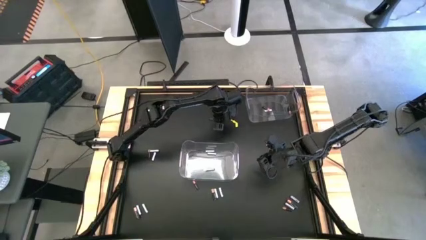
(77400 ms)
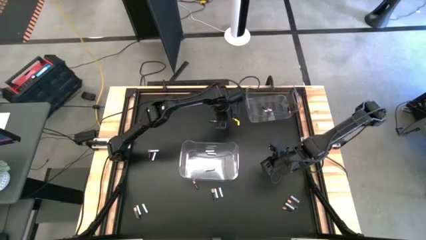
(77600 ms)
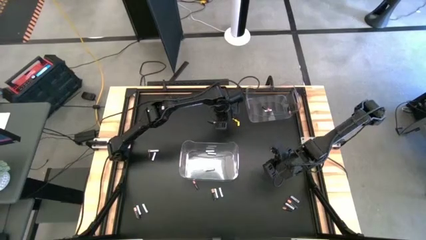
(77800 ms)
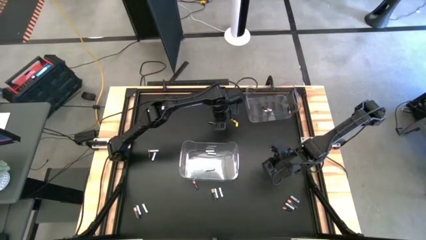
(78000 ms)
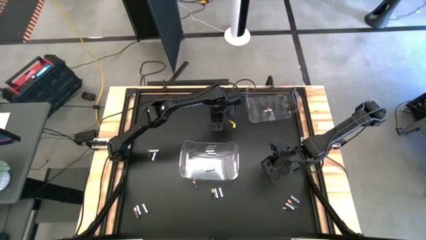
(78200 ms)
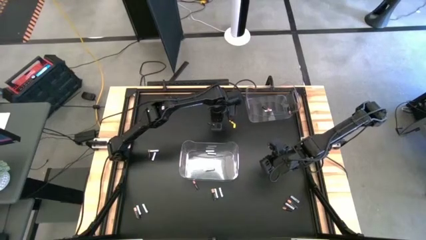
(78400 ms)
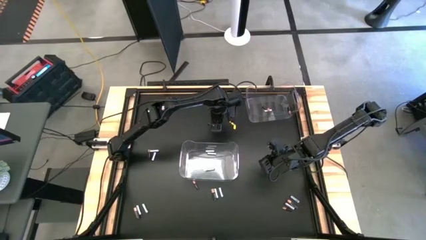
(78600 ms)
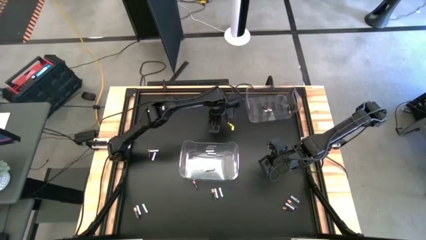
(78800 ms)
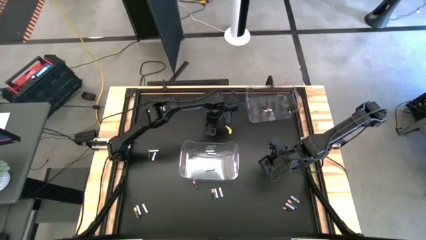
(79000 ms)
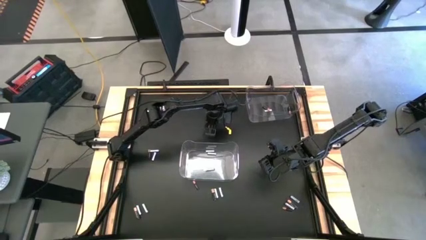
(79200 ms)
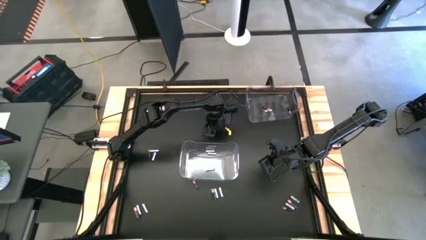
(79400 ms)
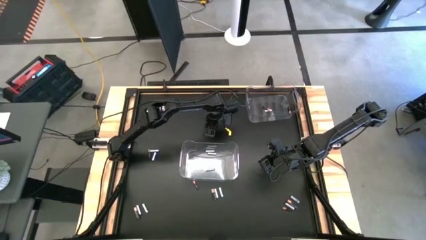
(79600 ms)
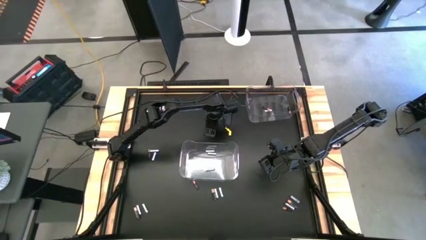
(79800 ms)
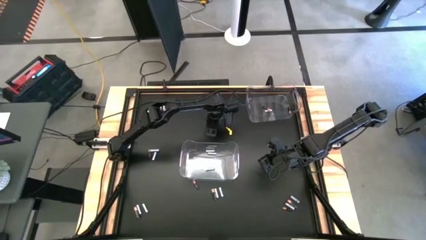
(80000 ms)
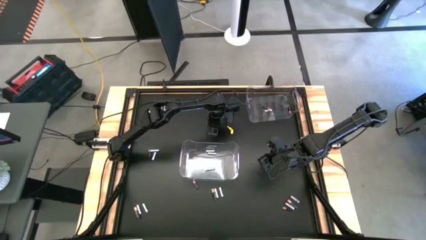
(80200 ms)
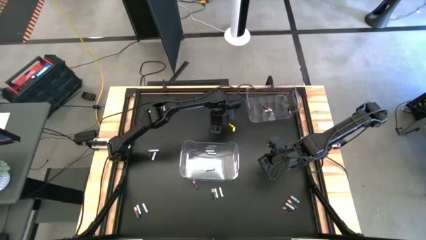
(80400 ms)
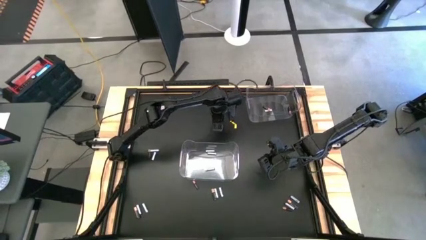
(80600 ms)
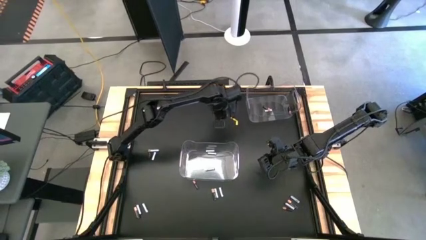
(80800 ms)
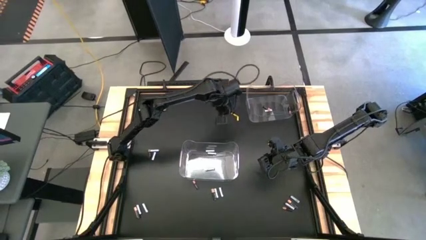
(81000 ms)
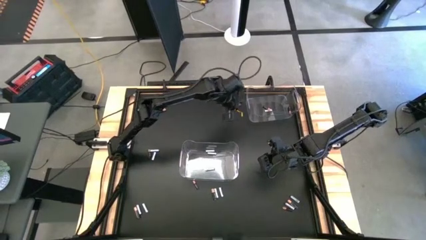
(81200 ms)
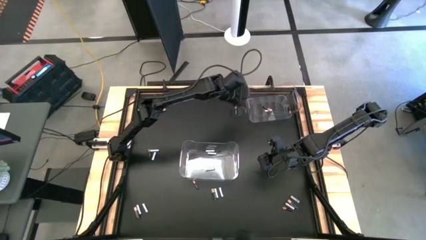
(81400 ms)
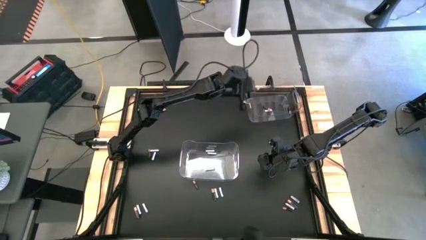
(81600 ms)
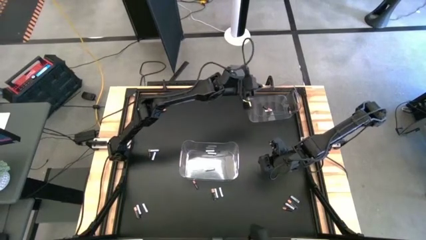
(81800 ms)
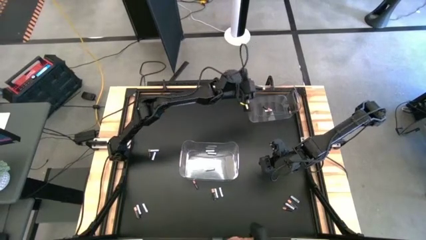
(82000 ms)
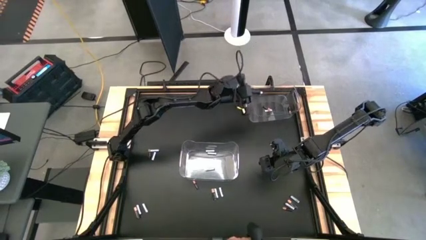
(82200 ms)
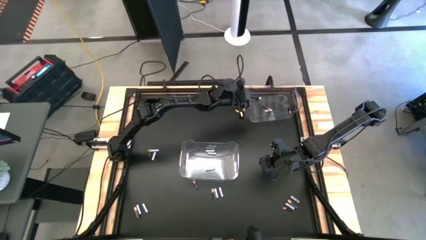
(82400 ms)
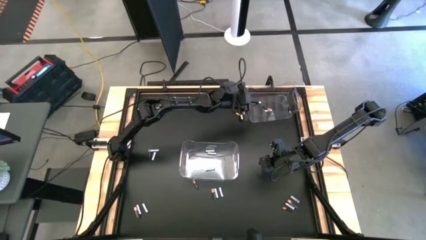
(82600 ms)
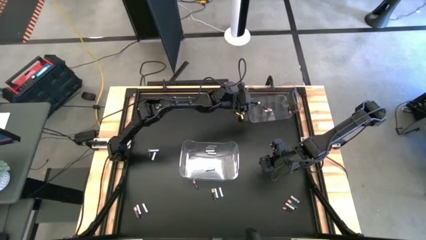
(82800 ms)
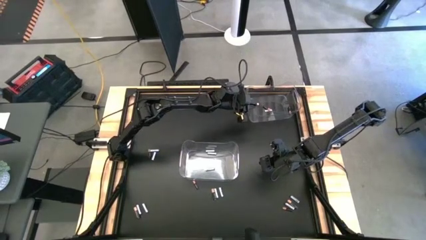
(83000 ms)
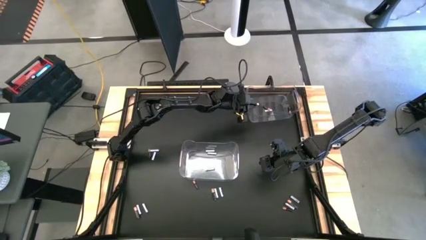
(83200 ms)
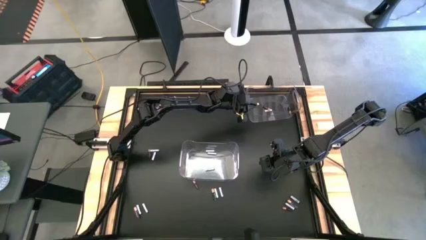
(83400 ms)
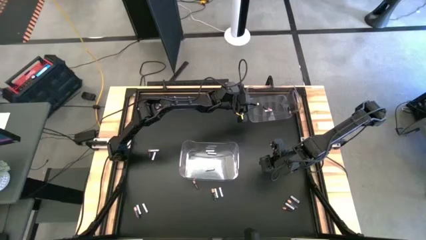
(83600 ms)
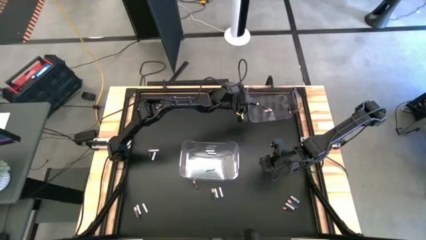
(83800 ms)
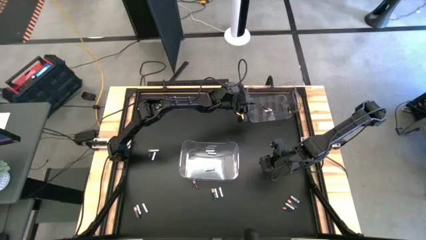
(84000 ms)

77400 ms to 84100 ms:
Task: Sort batteries
Put the black battery into the top transparent bin

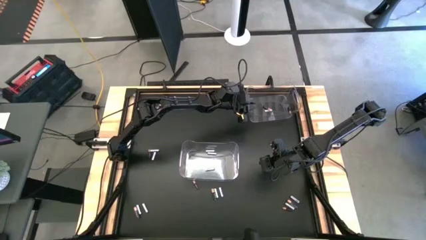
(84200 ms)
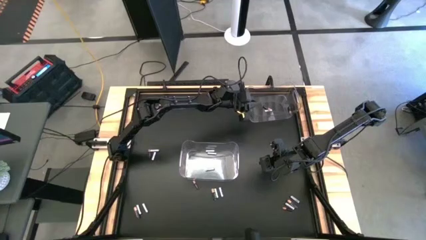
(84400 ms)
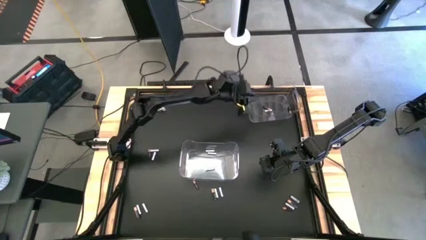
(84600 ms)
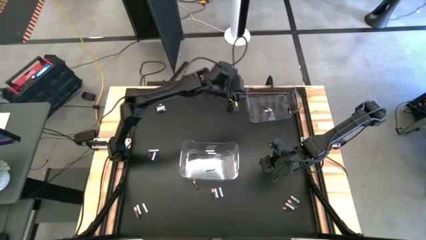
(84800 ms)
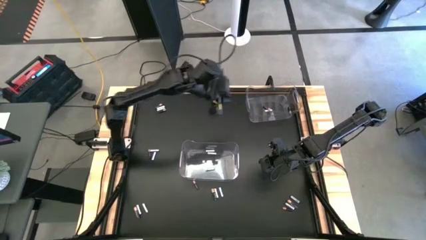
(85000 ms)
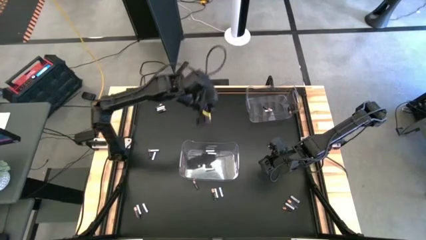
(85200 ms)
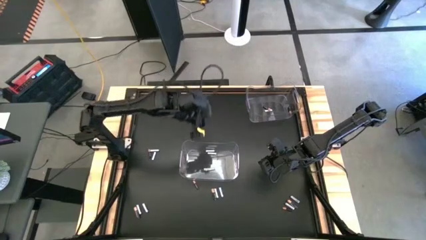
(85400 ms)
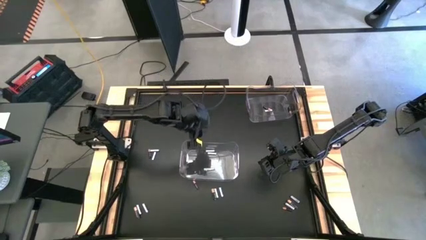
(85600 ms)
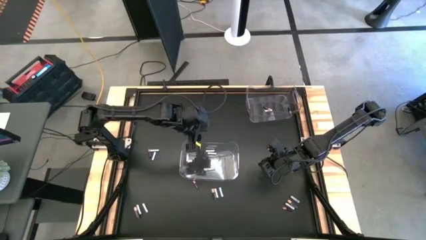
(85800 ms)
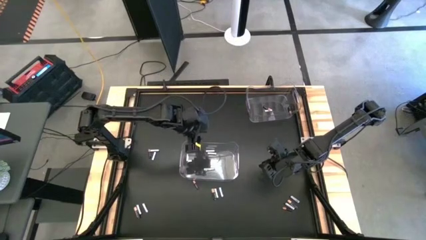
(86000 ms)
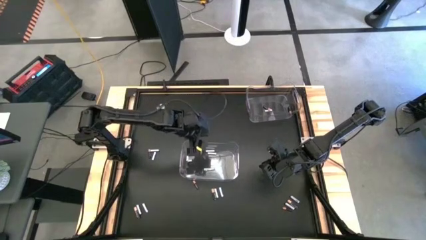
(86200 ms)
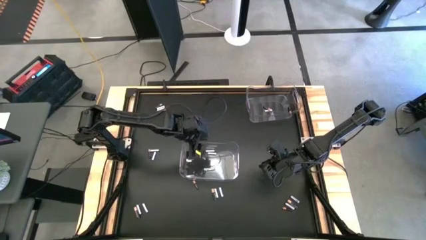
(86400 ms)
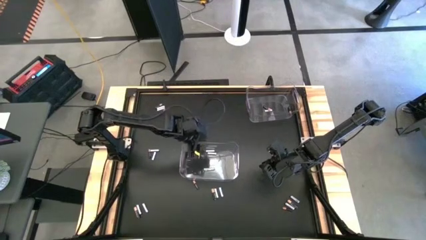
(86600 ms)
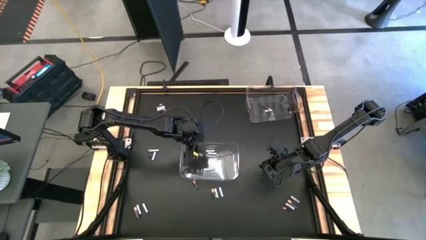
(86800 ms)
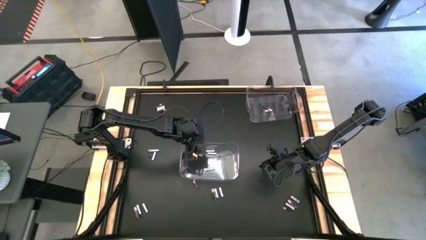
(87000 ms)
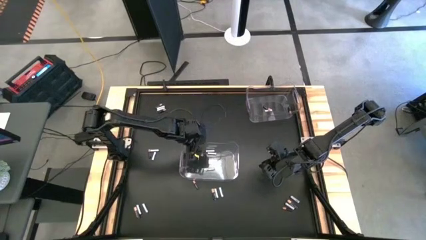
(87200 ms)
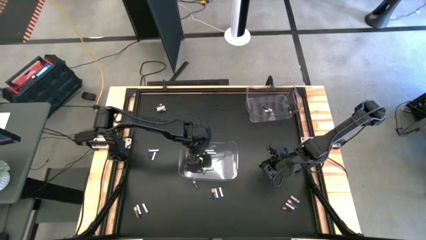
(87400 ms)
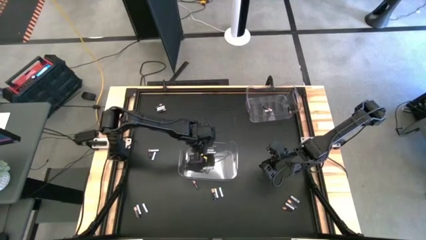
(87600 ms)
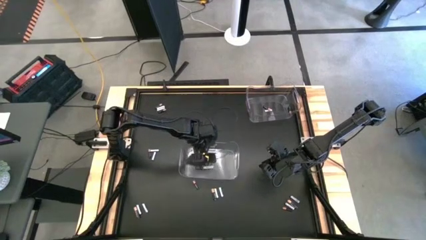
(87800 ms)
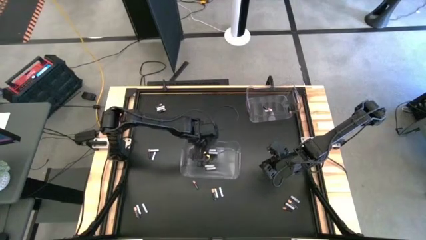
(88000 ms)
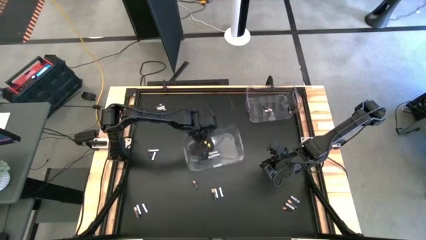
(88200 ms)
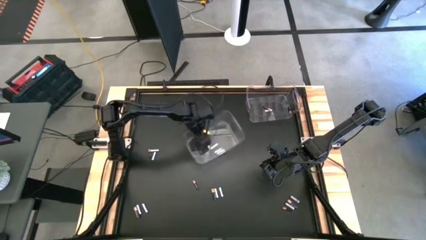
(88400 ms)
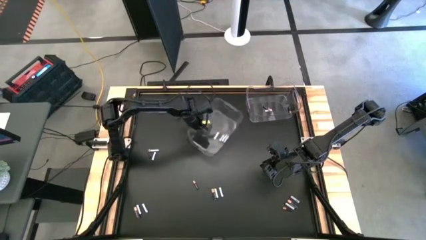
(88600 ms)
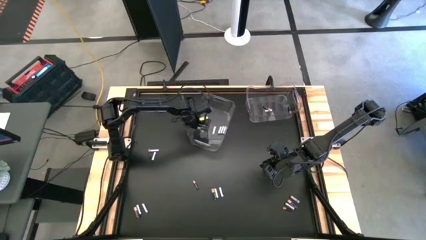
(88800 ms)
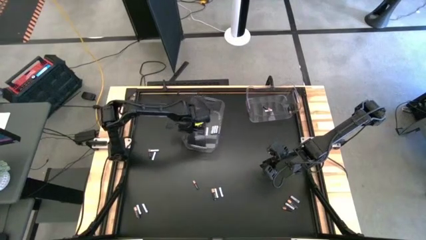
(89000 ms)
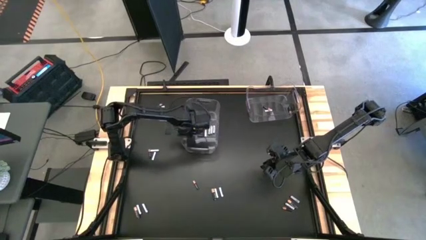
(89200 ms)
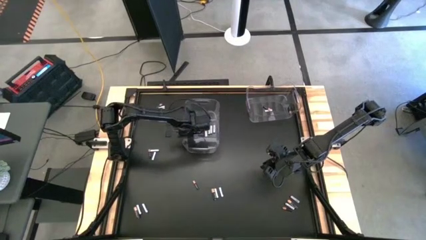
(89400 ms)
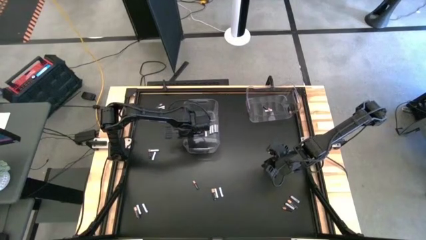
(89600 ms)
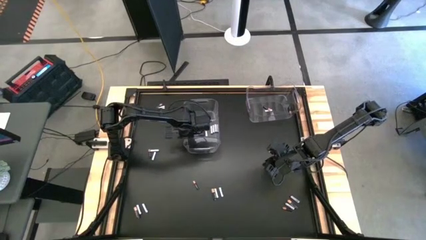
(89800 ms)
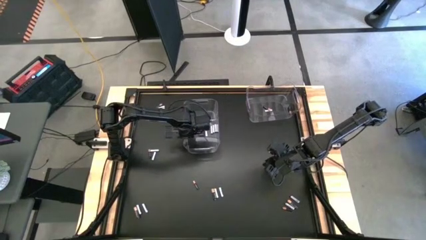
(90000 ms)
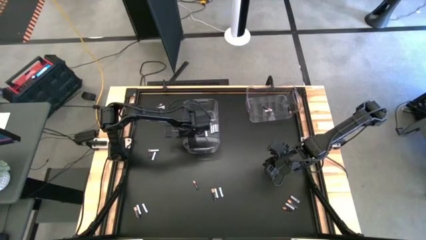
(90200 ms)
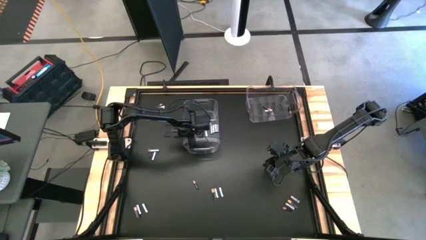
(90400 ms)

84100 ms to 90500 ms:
Move the bottom transparent bin to the top center of the table

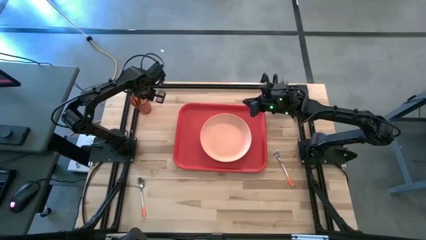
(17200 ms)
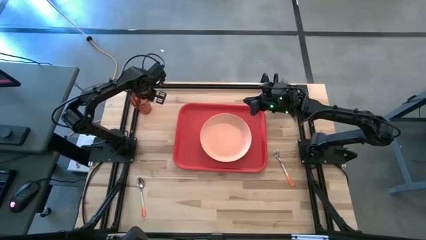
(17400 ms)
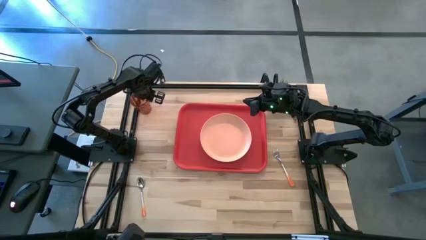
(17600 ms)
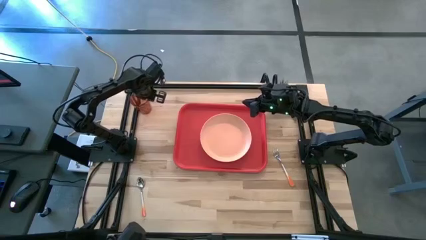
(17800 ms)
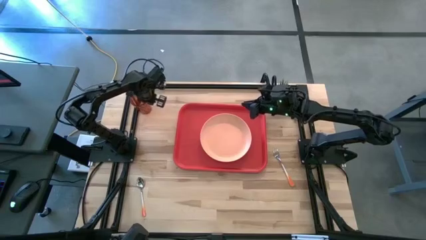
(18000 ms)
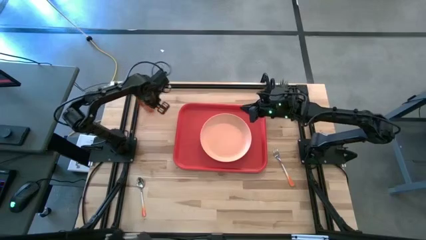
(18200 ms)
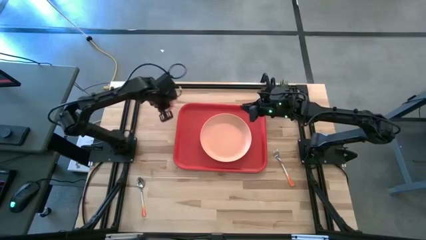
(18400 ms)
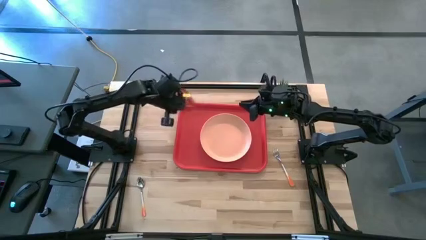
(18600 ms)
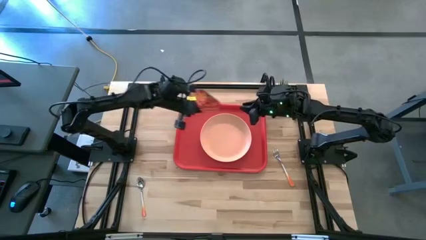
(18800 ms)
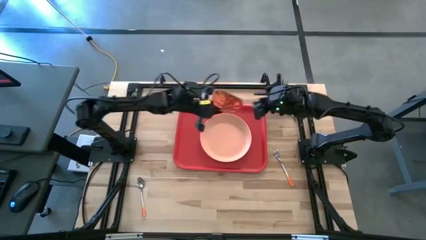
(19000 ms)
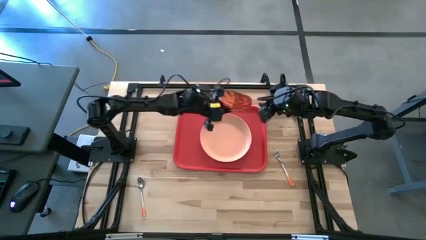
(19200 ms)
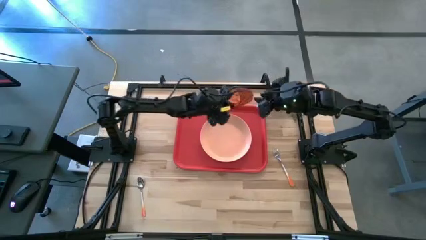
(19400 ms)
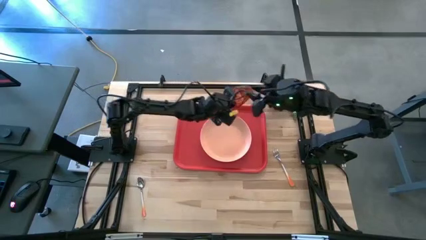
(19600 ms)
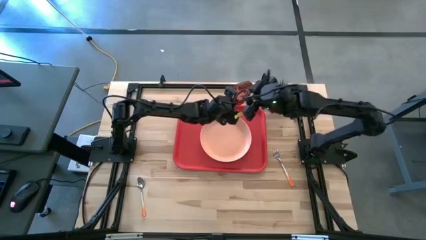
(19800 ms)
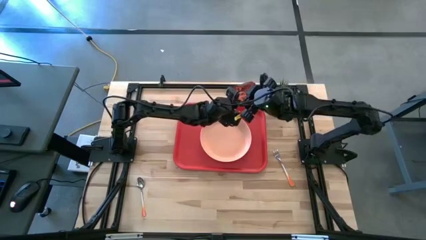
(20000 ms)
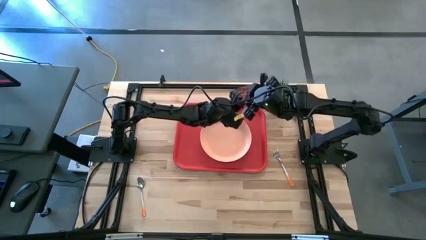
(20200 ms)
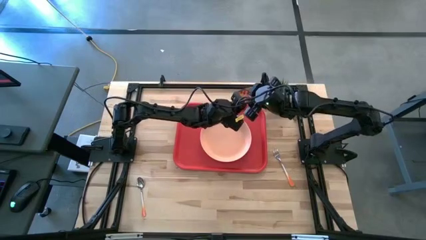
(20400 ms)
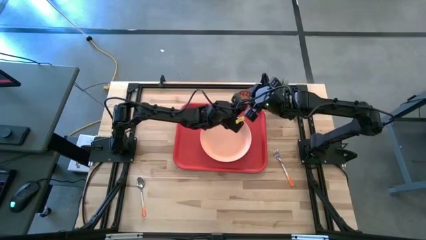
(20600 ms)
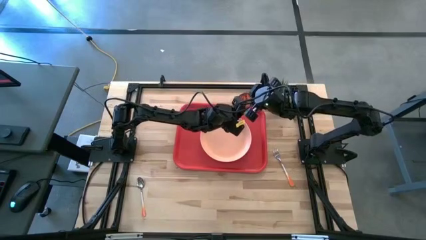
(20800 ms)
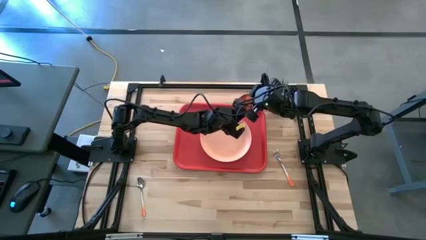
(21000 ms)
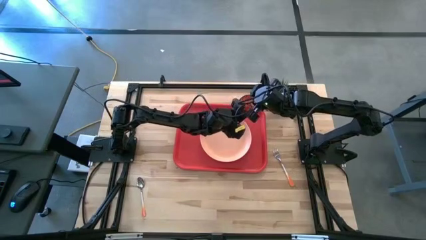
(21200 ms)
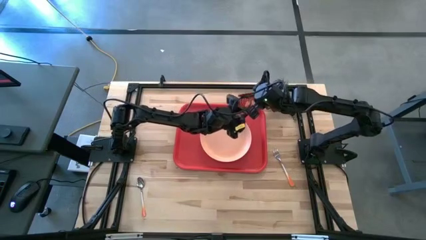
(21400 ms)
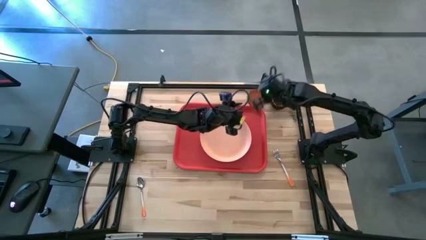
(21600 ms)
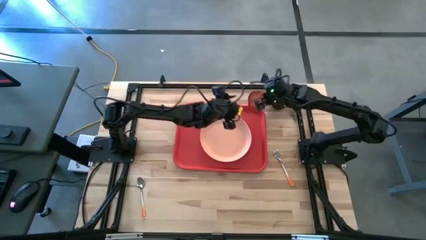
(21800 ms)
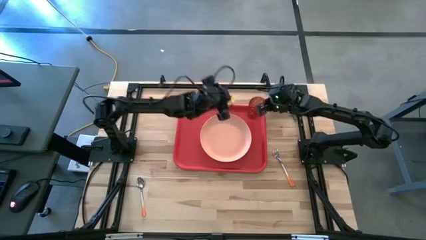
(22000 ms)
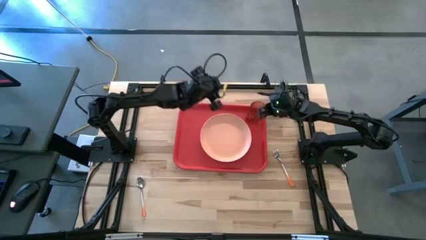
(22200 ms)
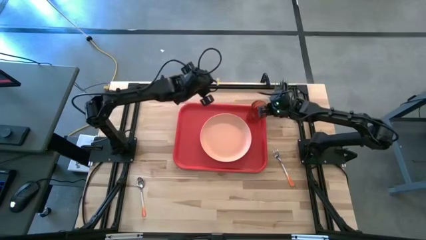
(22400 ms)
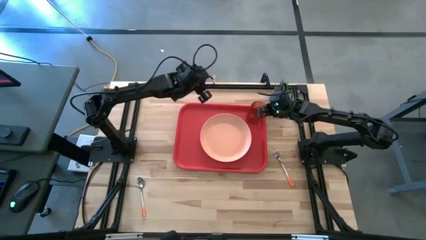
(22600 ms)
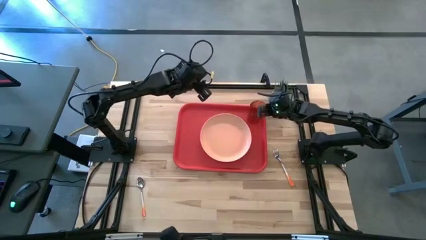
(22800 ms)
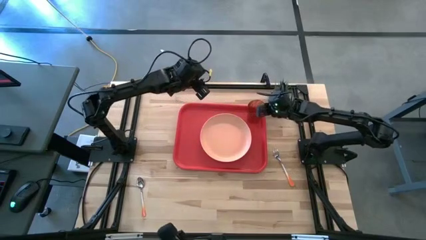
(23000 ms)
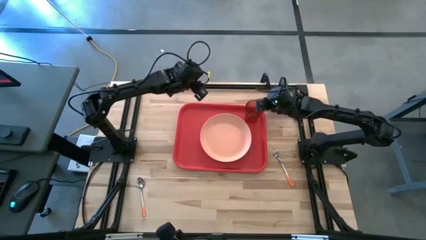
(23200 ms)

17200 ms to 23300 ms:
Task: Pick and place plate/cup/fork/spoon on tray
Put the orange cup on the top right of the light orange plate
